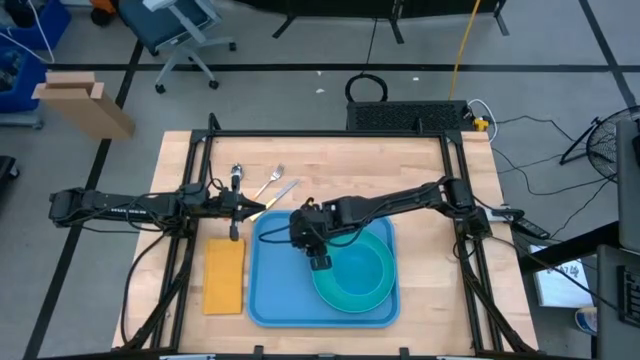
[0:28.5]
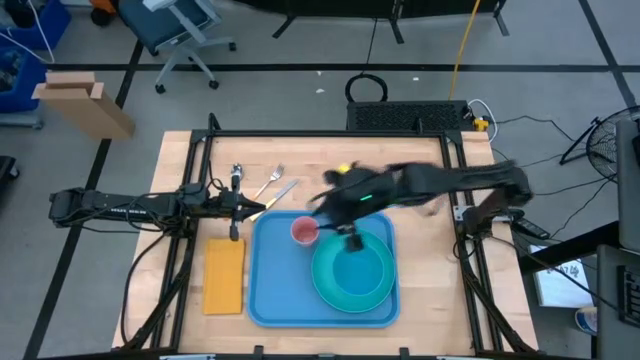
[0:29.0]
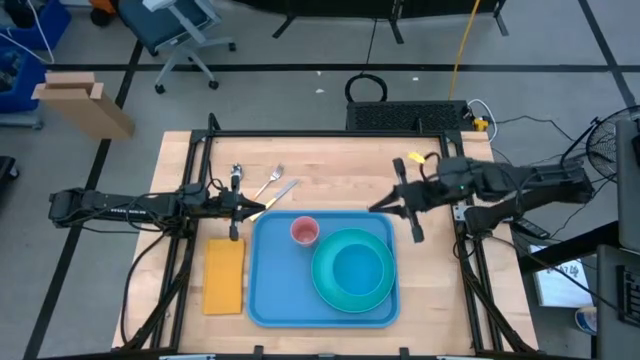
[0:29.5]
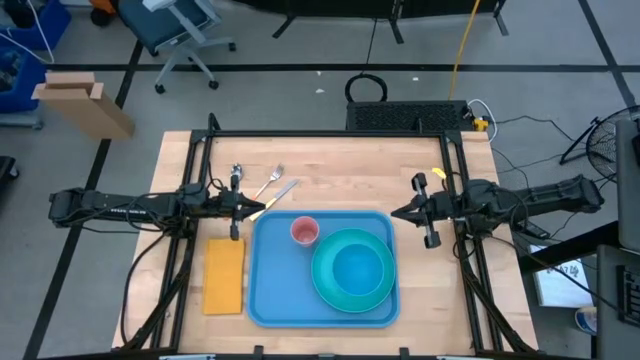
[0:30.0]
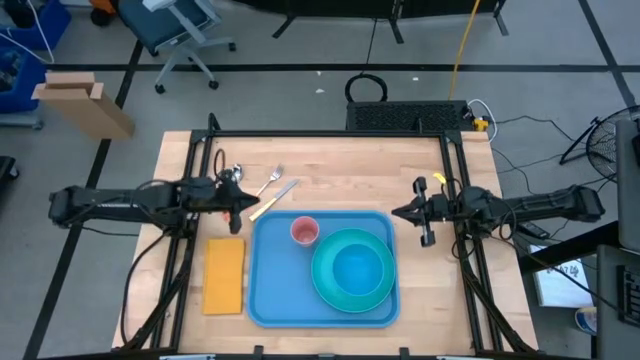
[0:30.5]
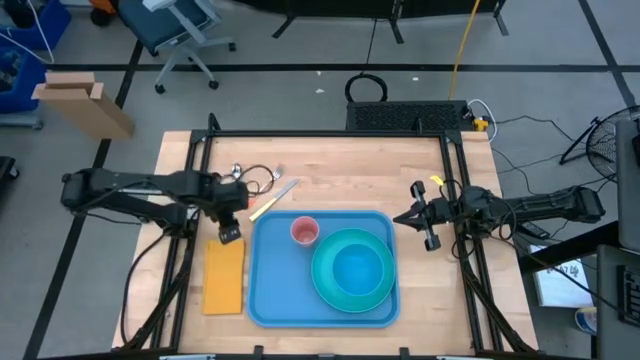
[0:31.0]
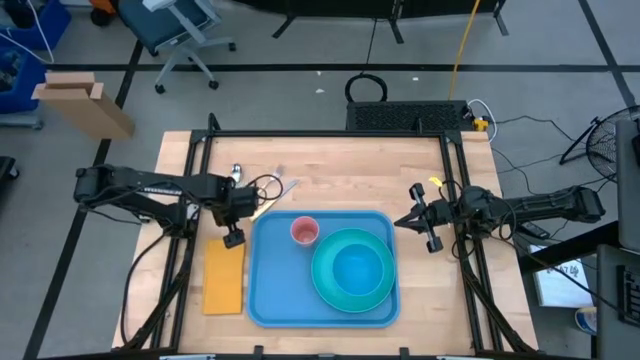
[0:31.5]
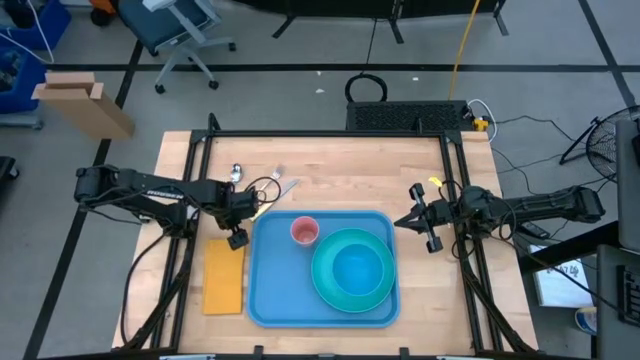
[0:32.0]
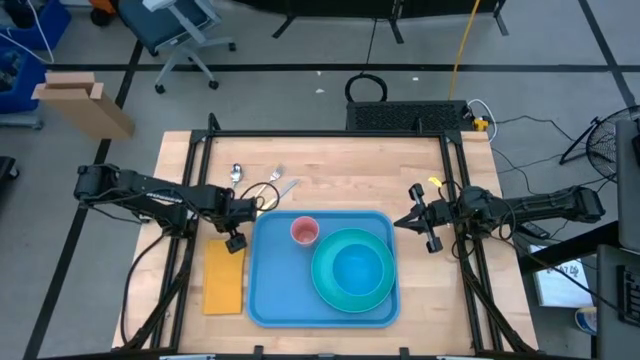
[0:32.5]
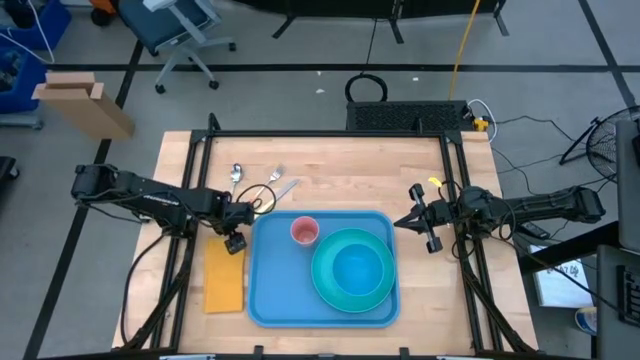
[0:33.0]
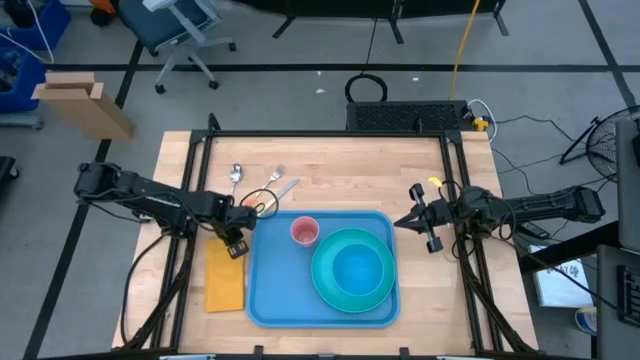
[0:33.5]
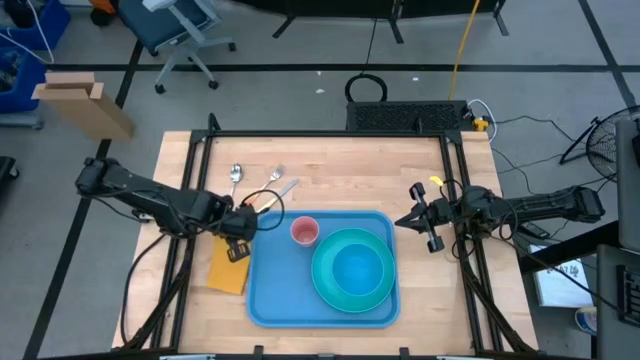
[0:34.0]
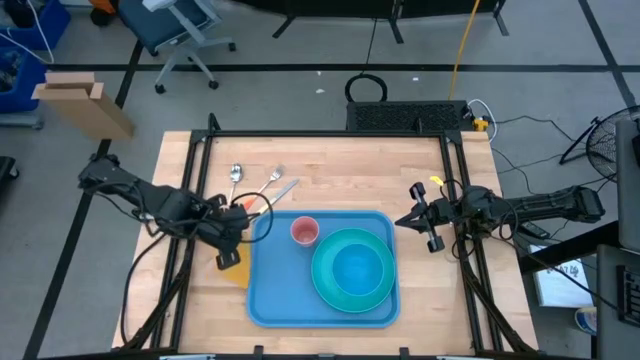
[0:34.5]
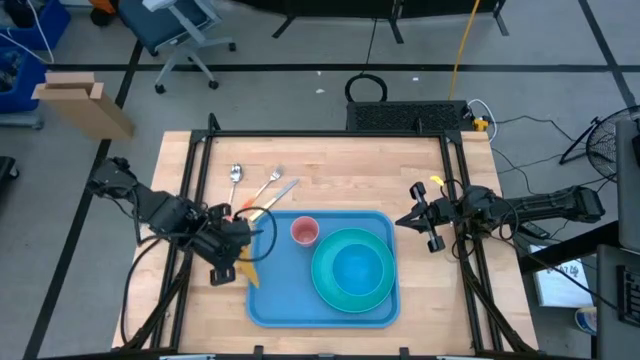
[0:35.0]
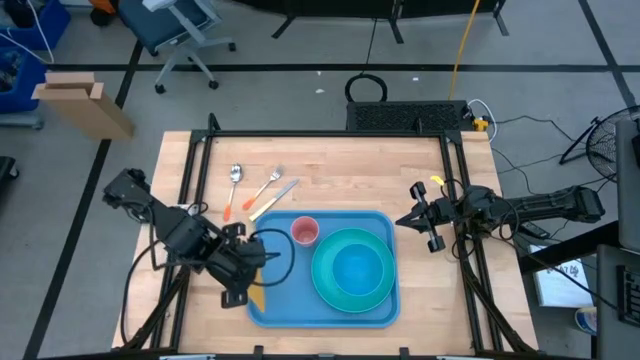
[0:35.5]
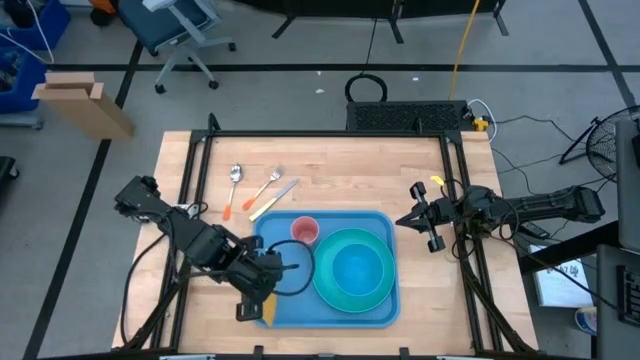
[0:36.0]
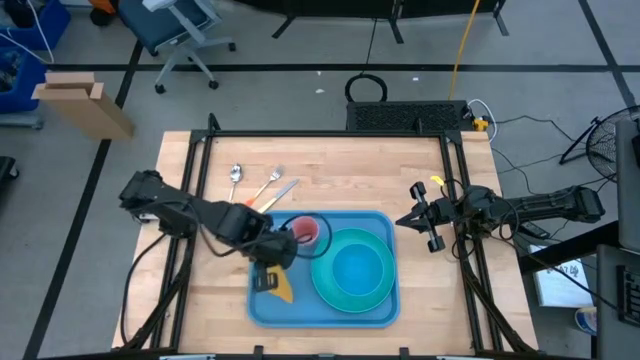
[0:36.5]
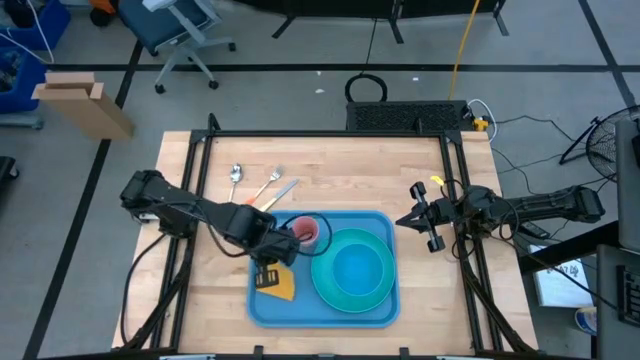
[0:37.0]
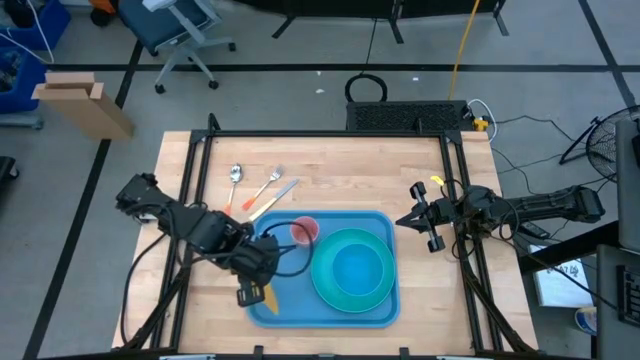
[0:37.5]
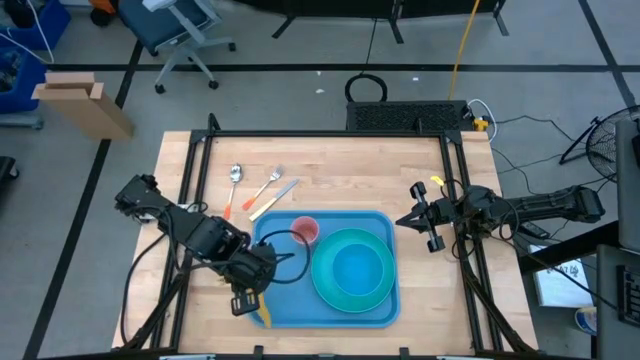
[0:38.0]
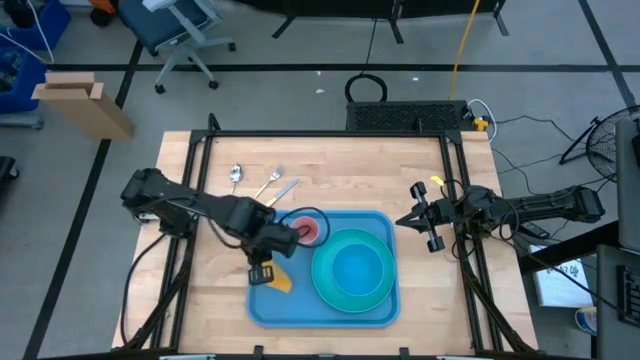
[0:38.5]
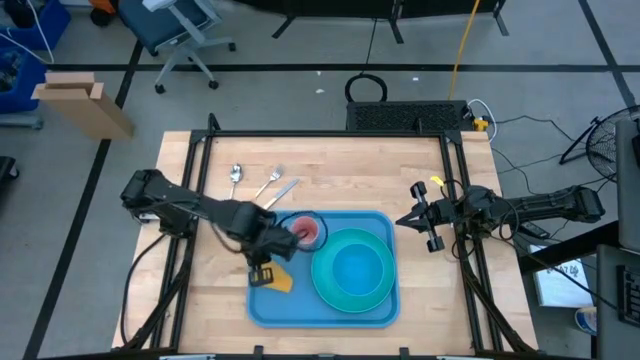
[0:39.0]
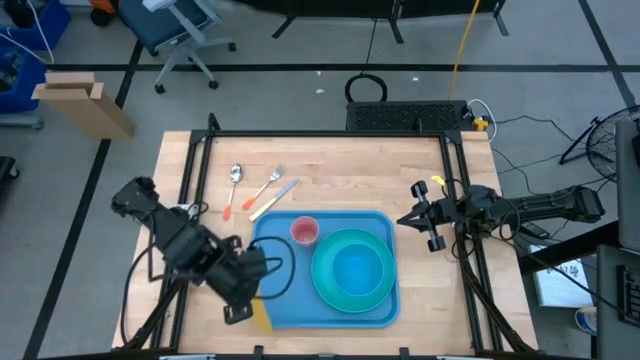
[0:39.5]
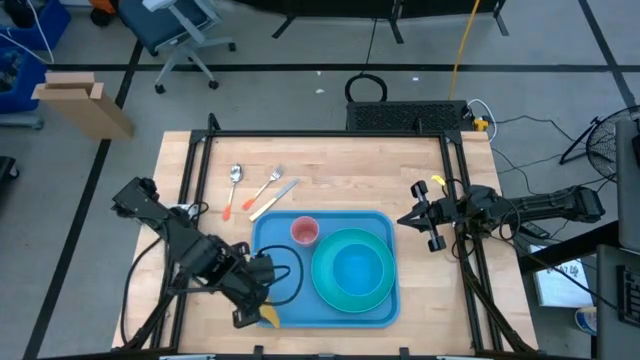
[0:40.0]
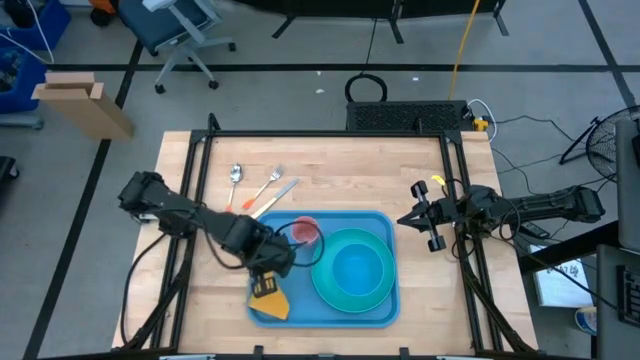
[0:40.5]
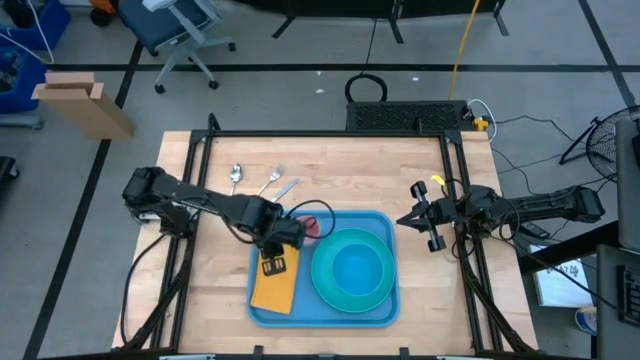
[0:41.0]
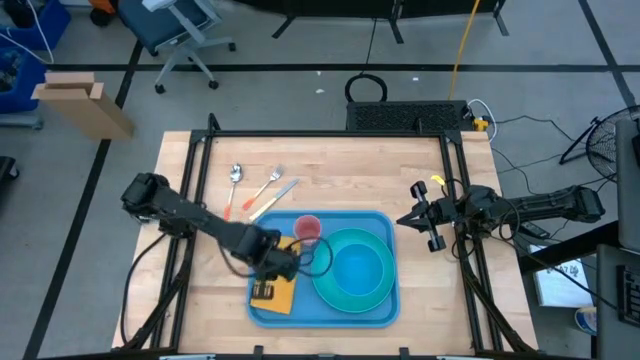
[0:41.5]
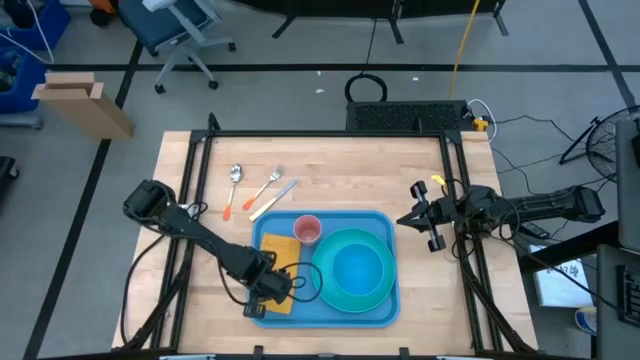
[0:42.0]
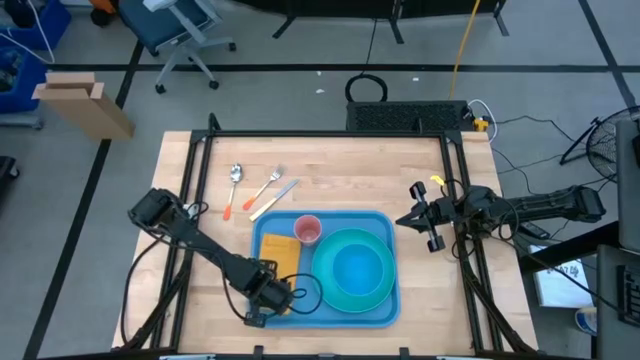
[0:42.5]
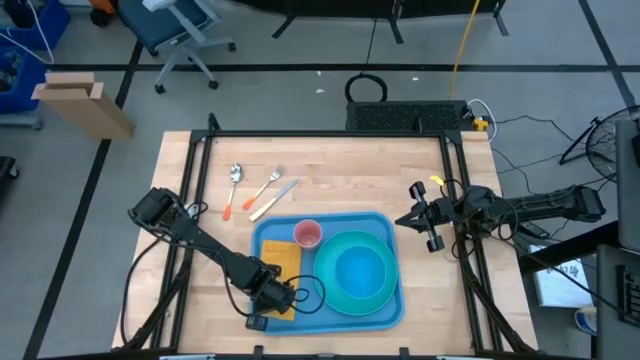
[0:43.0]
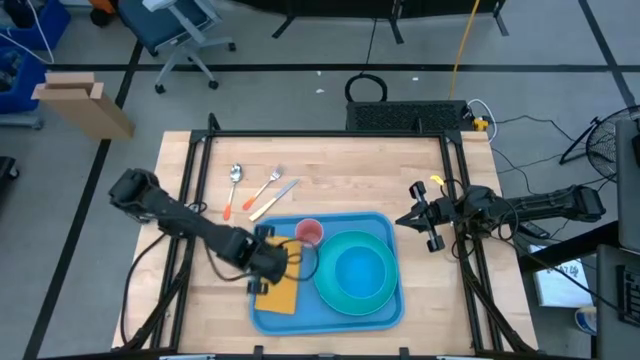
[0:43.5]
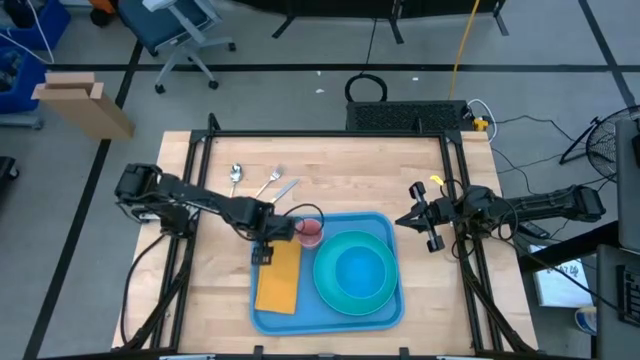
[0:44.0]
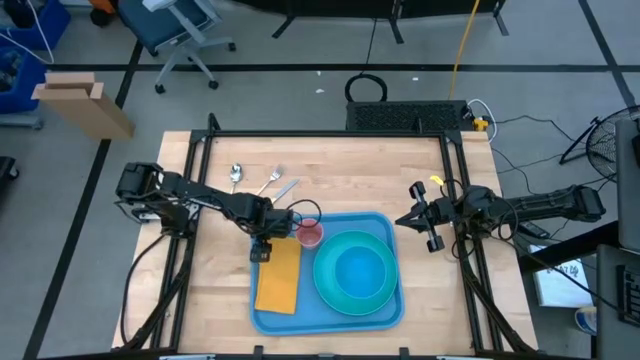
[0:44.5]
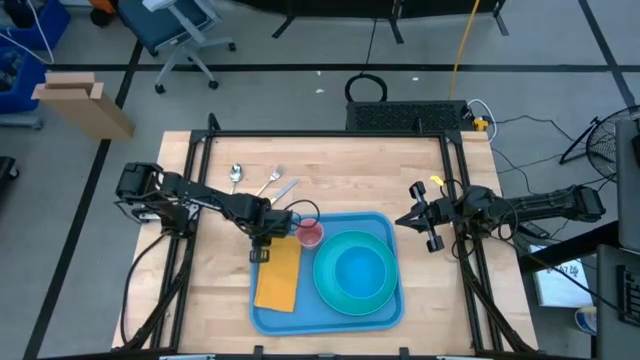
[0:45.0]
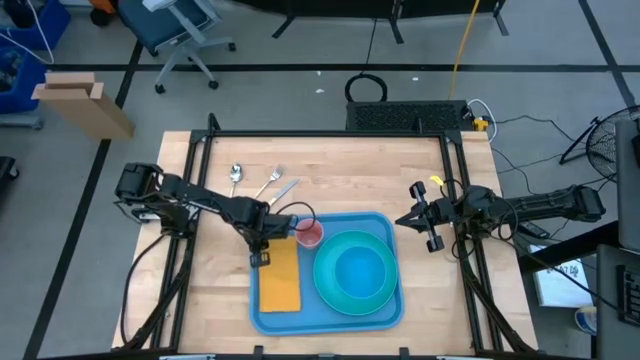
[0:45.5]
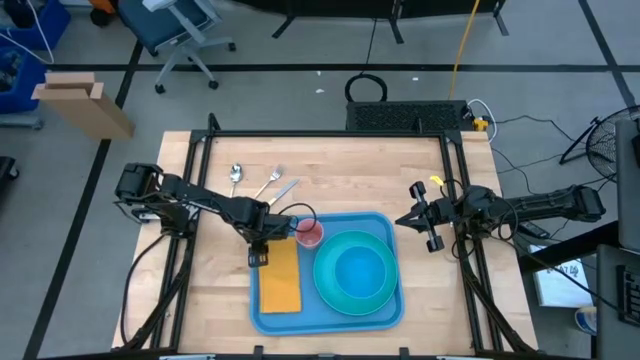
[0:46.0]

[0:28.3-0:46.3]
Task: Set up tray
Put the yellow napkin on the bottom left of the pink cup

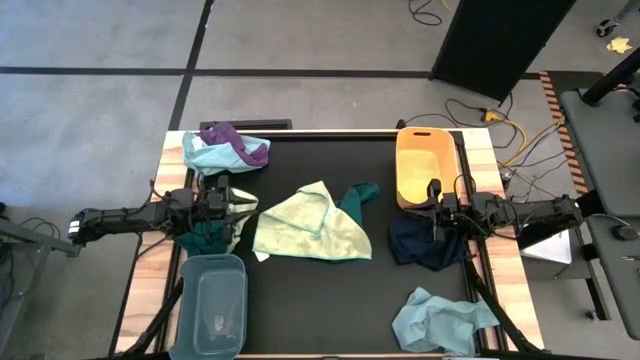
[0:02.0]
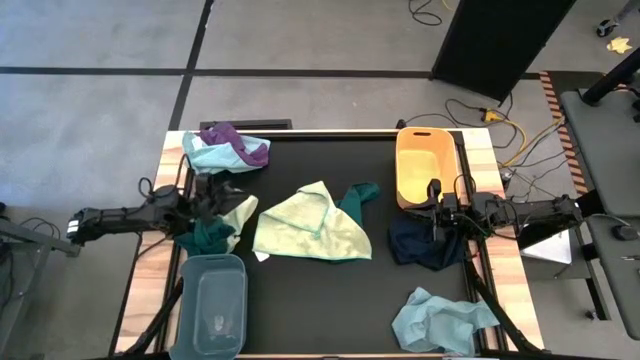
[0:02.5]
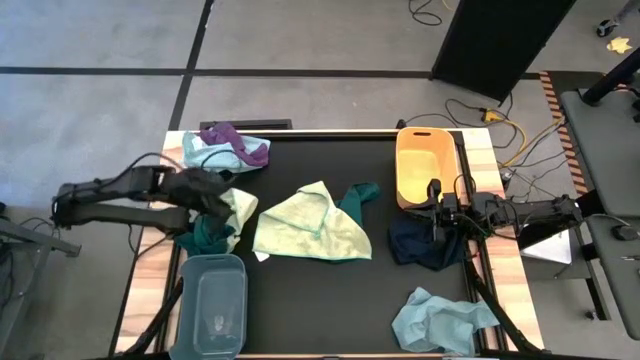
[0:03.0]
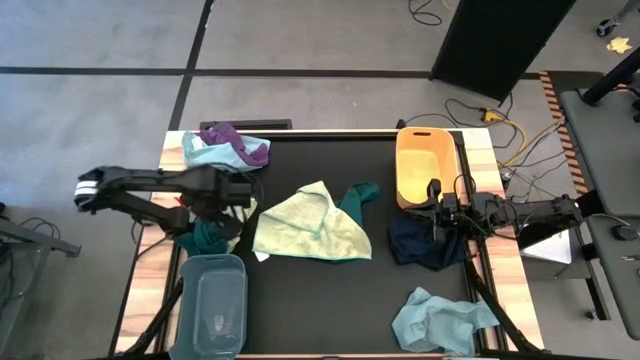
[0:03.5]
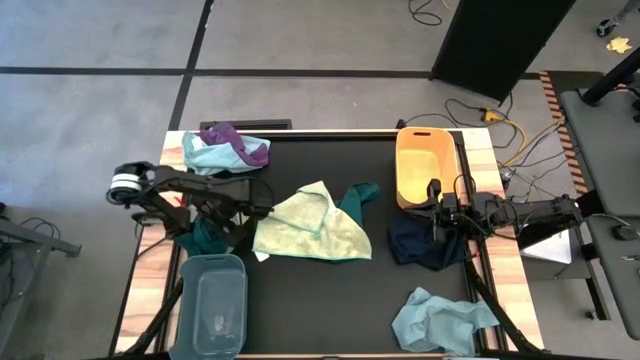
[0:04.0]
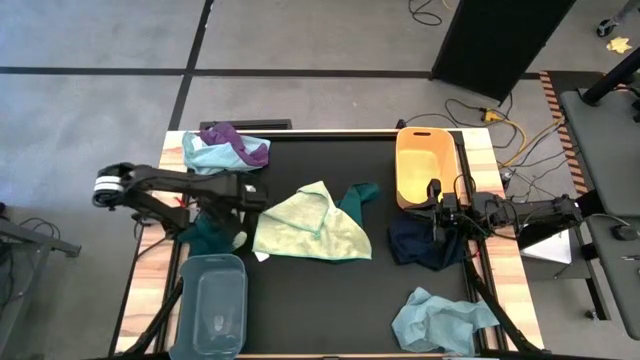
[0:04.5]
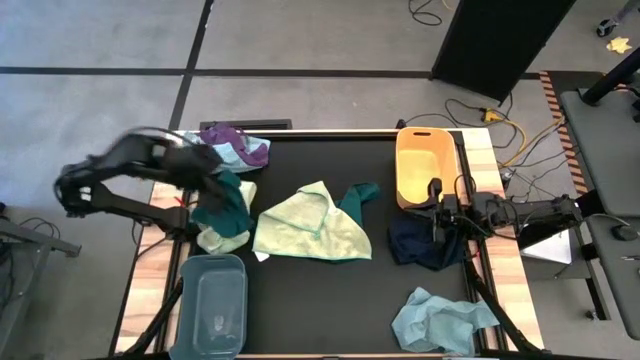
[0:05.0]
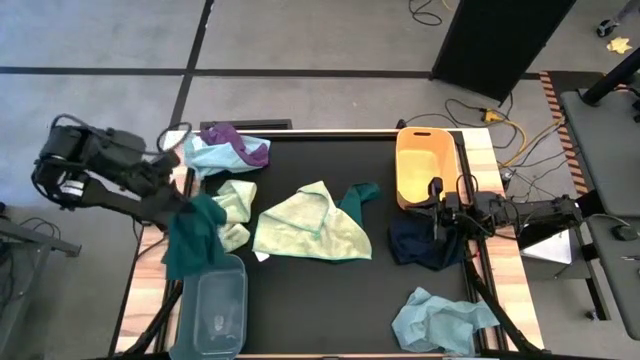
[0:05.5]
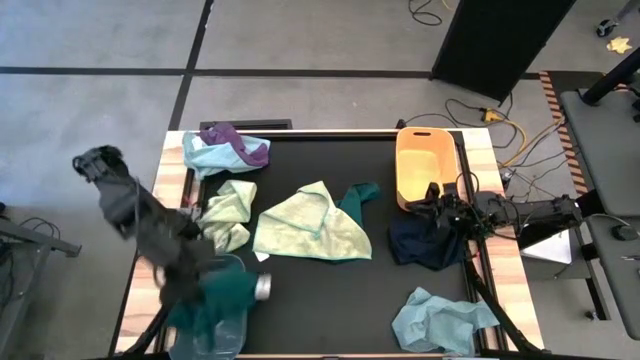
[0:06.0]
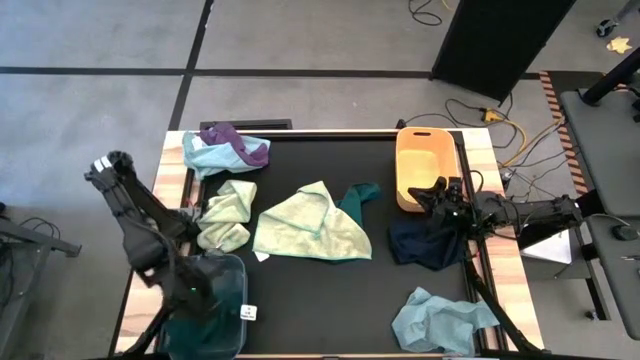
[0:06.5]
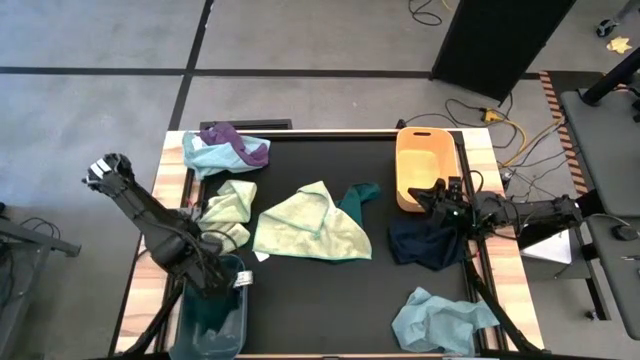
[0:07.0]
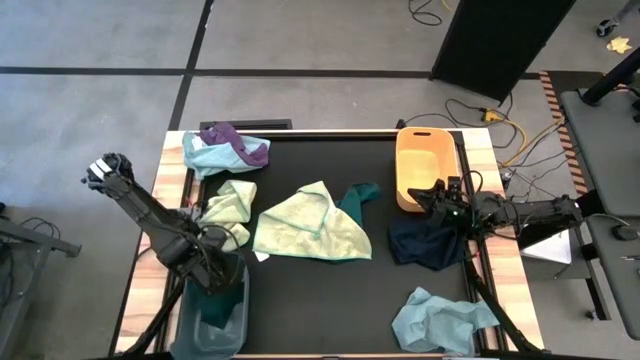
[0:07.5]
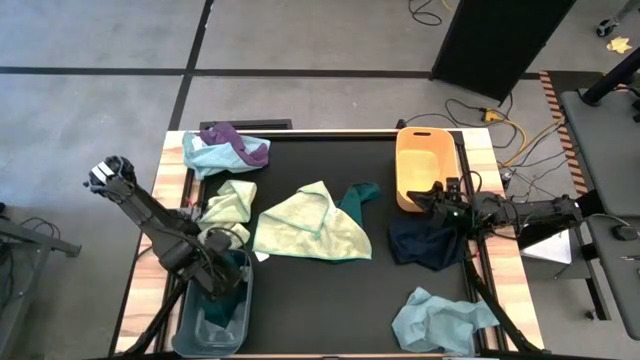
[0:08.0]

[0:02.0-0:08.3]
Task: Sort microfiber towel by color & place in baskets
Put the left dark green microfiber towel into the green bin
